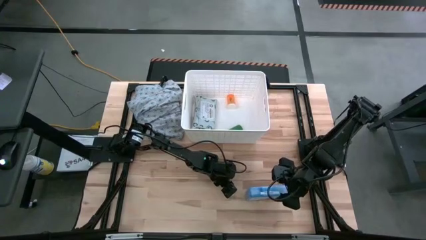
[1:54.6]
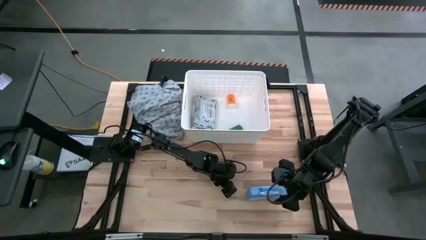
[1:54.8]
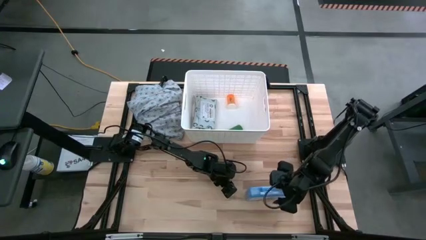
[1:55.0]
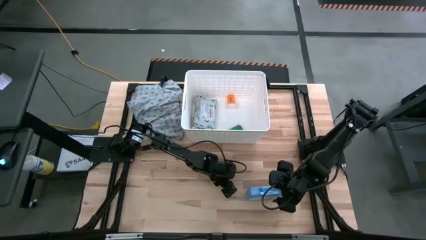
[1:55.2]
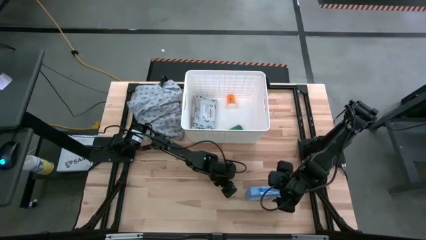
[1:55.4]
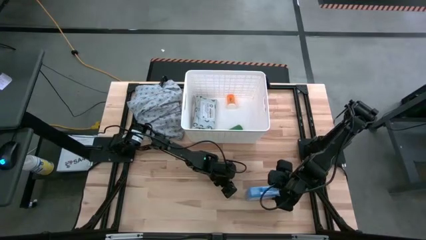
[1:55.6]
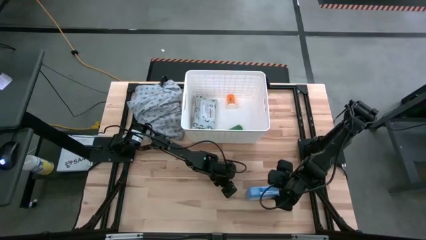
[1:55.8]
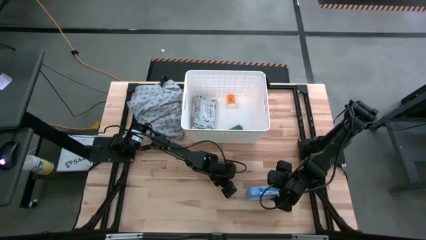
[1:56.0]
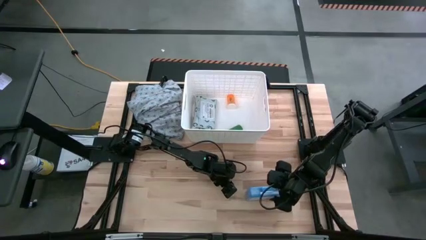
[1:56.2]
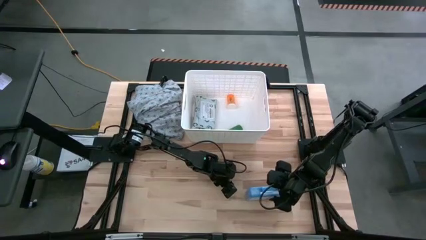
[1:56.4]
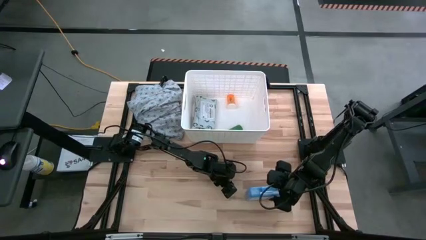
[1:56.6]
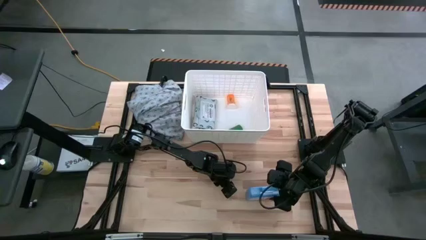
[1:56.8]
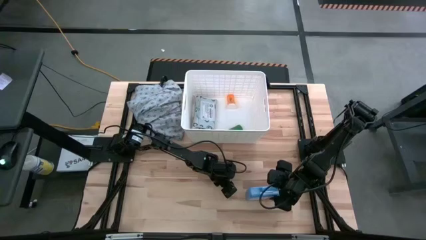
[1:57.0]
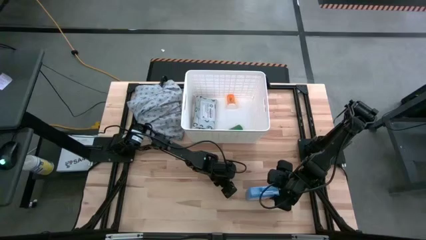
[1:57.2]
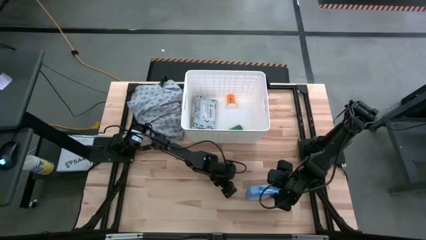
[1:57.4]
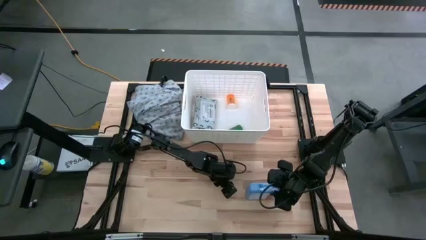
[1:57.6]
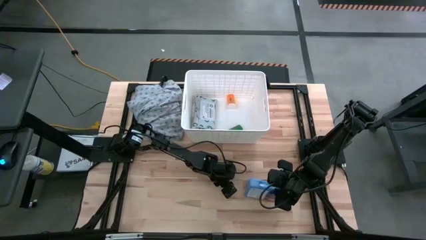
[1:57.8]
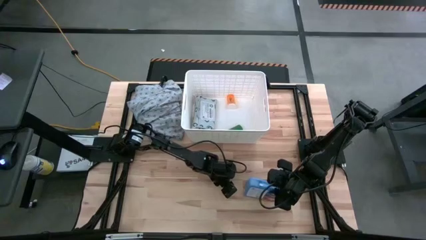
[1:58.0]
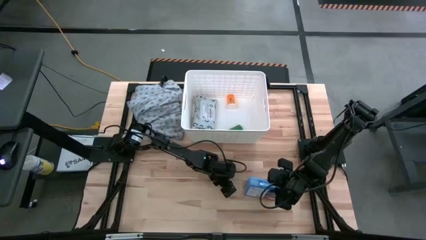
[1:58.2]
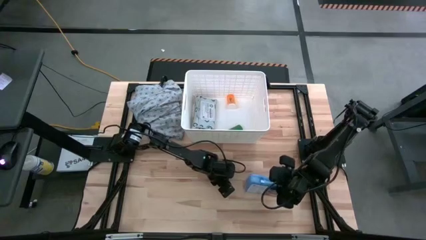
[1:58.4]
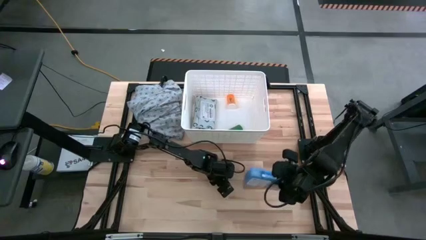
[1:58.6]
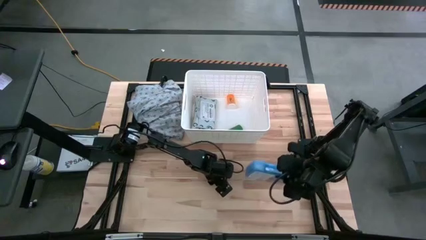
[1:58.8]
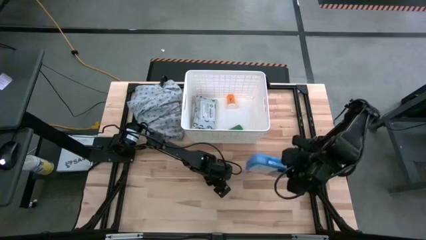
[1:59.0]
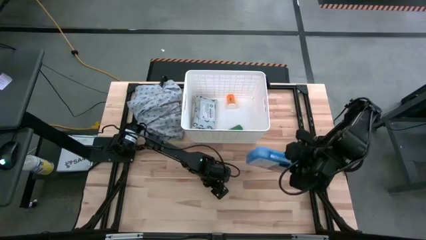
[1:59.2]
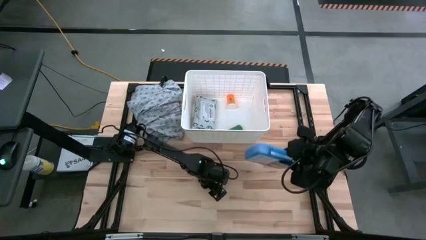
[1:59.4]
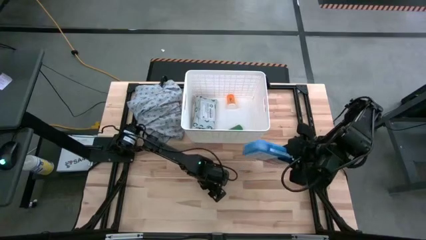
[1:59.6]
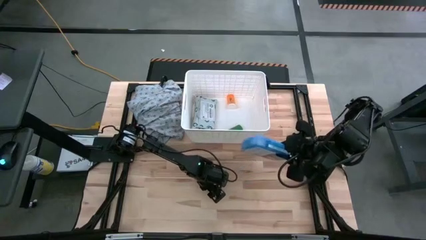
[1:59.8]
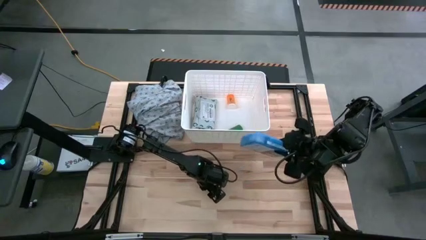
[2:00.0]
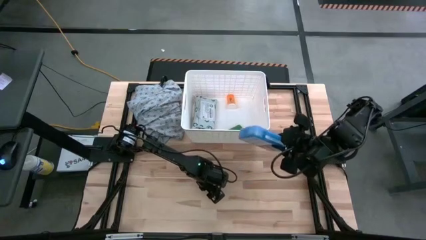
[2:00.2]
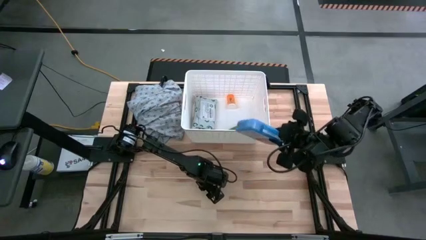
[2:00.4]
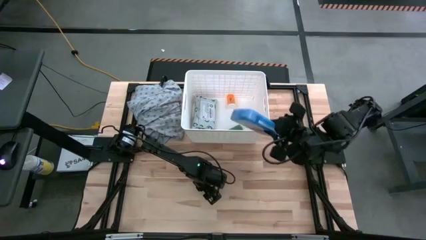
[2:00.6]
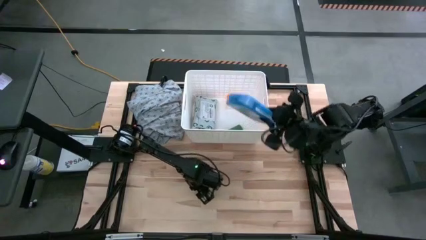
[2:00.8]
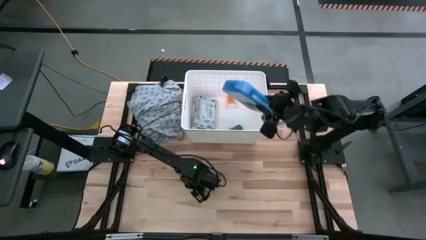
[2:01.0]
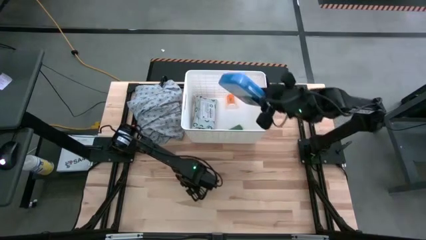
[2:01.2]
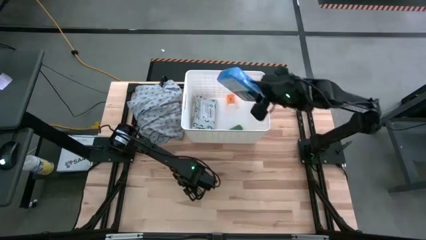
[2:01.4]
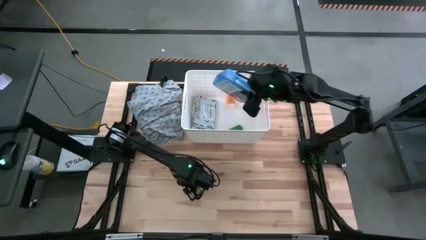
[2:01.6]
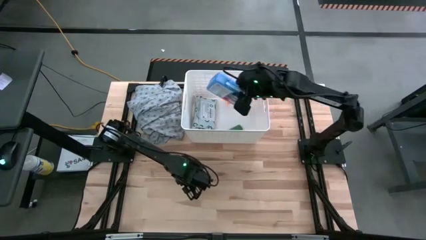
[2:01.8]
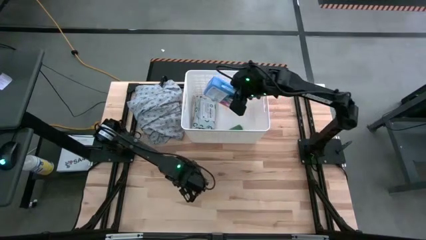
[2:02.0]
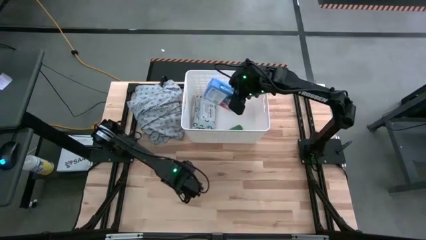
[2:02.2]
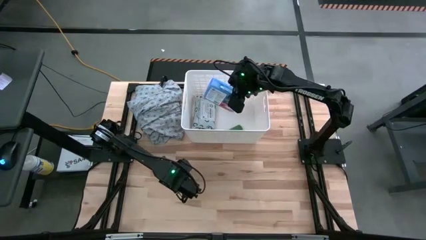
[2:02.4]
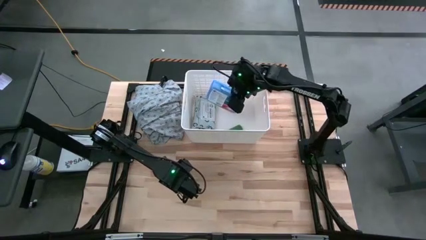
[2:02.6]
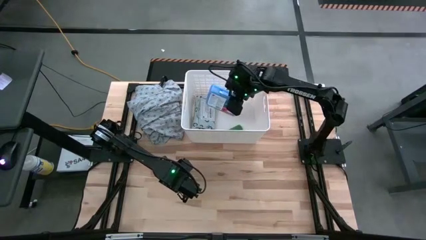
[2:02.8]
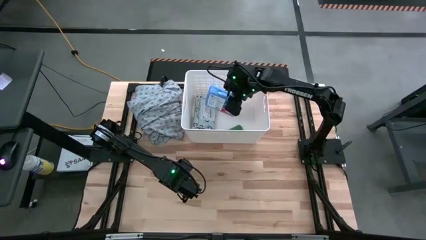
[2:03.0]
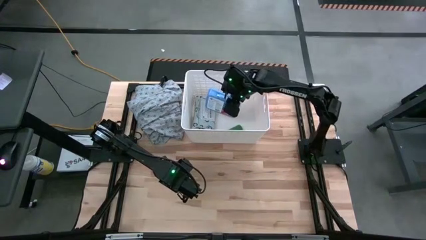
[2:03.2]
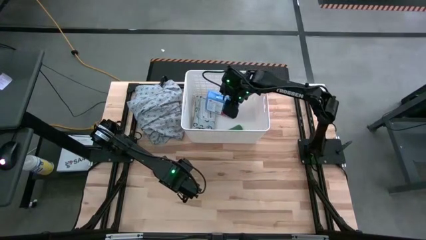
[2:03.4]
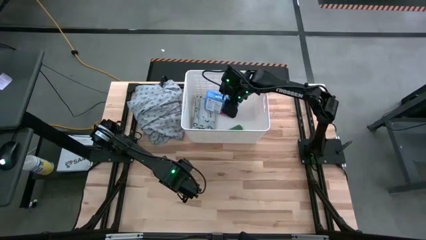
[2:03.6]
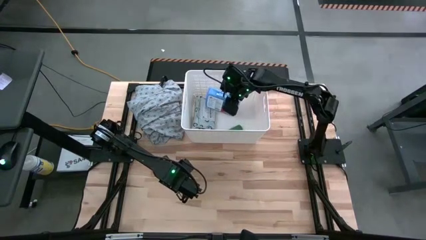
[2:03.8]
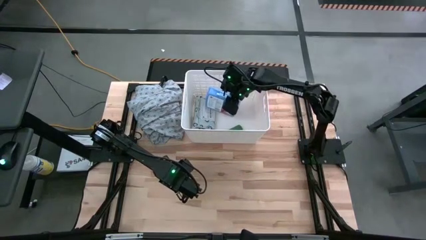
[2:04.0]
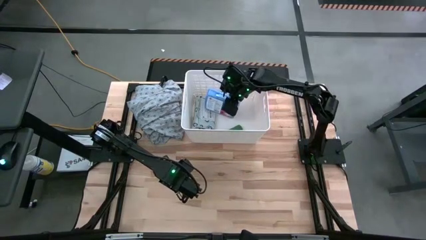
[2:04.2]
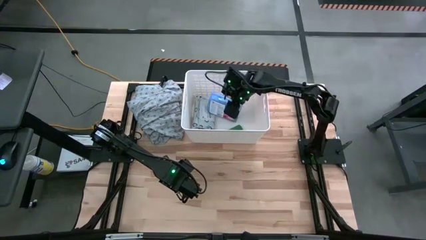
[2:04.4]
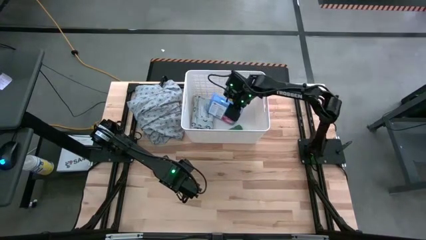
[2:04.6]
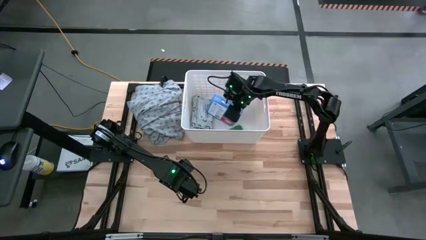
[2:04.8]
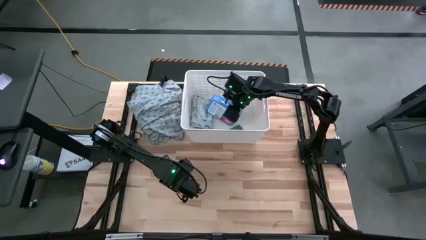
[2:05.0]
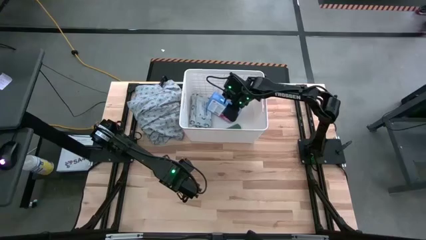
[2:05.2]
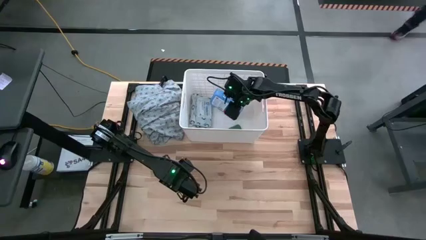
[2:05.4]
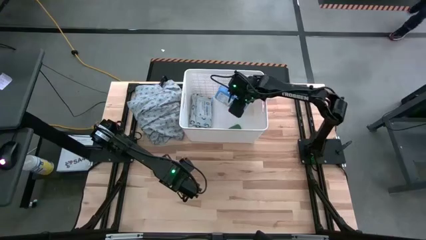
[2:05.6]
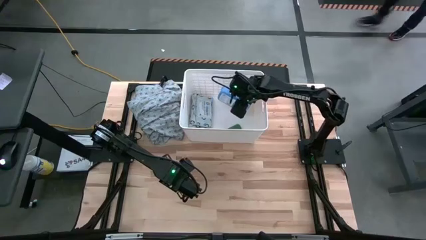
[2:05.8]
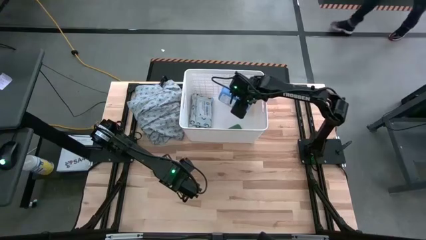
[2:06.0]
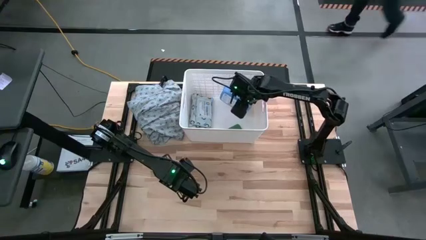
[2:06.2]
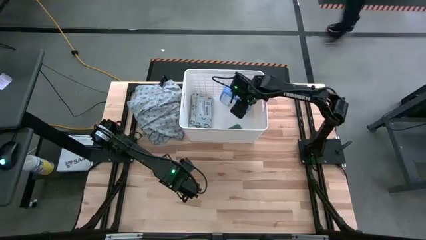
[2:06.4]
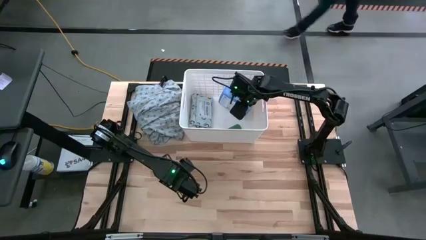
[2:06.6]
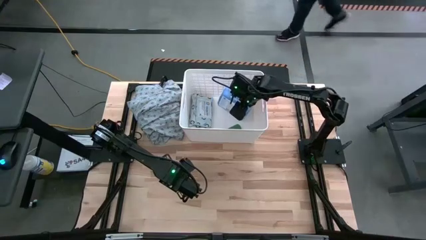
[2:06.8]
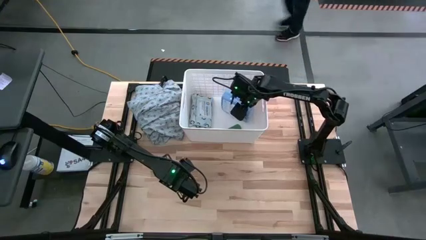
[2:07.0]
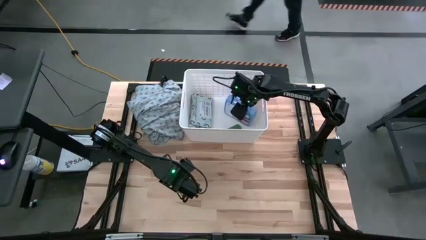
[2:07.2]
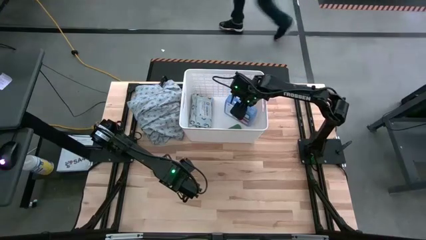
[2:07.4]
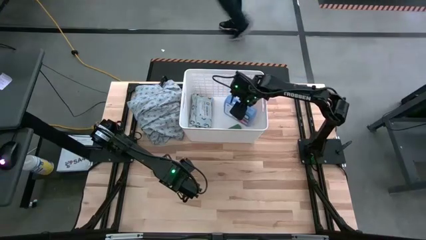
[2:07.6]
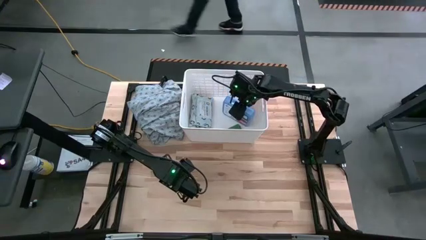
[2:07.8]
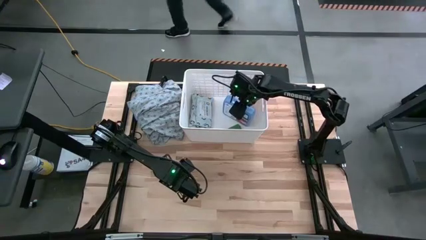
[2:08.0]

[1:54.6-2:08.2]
Task: Pick & place medical supplies in basket/bin
Put the blue first aid kit in the white bin
